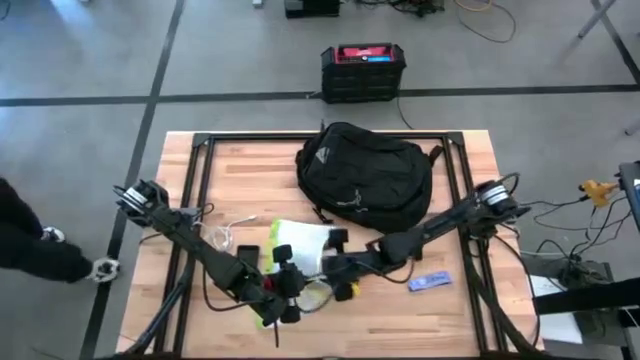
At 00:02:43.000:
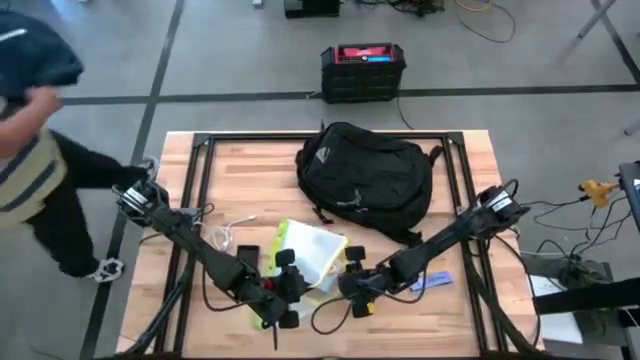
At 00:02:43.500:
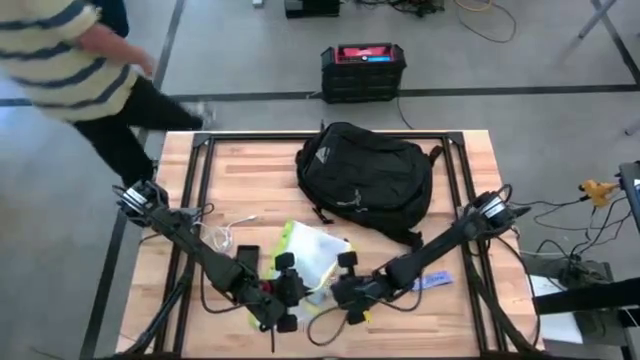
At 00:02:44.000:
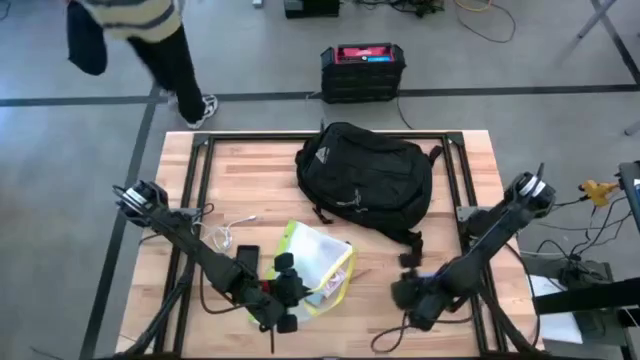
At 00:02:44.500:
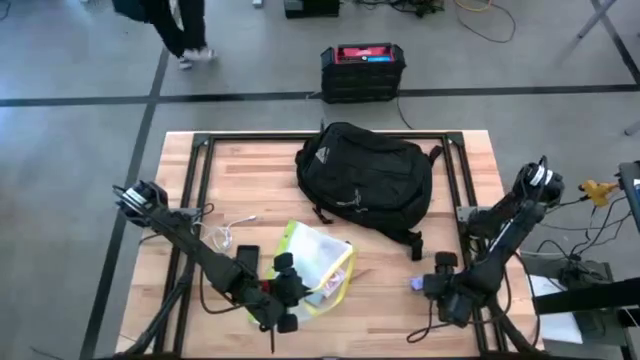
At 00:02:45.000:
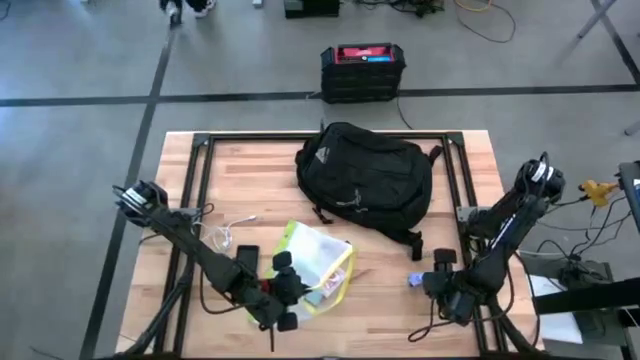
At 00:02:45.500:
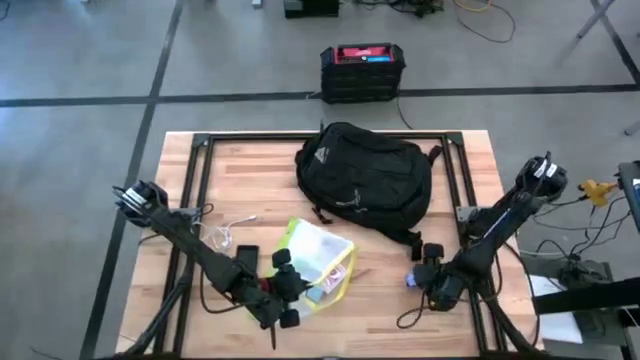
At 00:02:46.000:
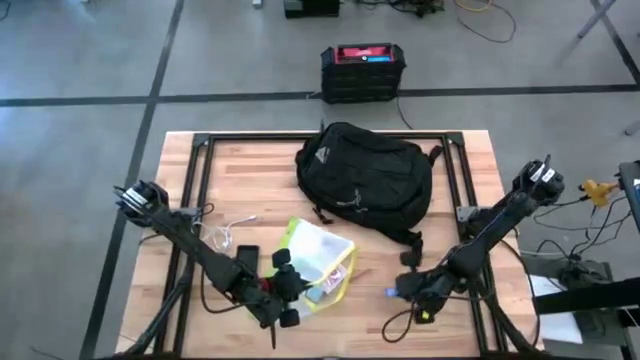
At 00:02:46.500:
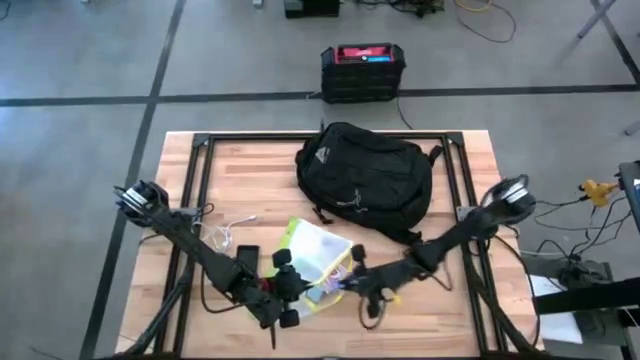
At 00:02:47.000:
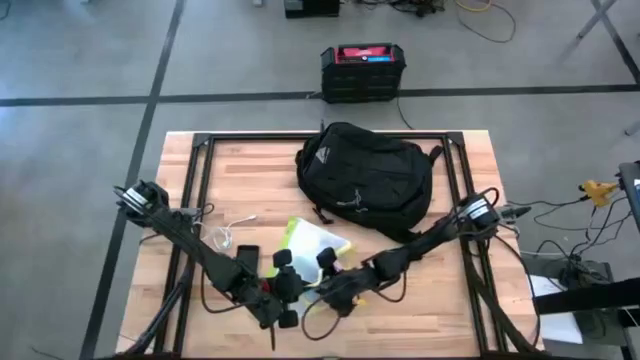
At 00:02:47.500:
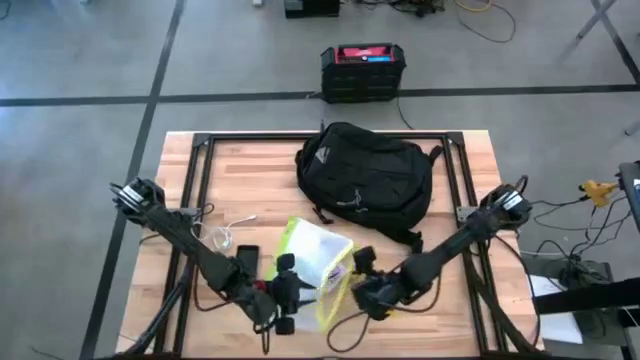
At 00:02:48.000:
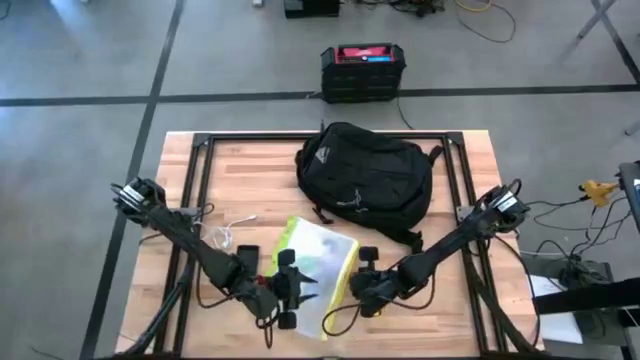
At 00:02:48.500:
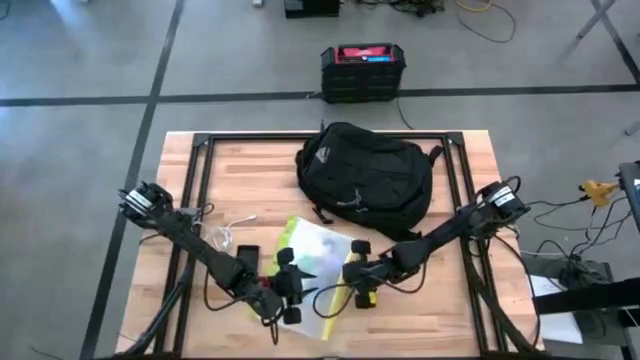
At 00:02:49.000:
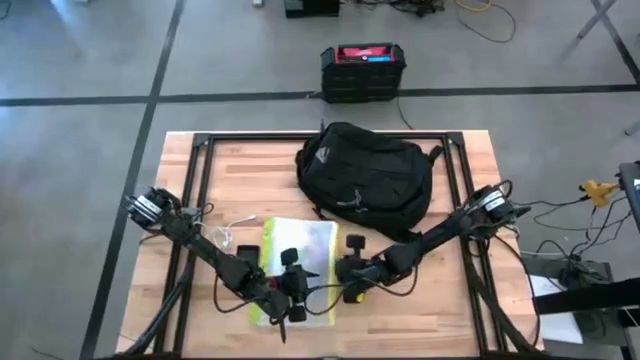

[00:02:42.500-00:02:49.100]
Task: Unpack backpack
Put the violet chocolate bar into the yellow green zip bag

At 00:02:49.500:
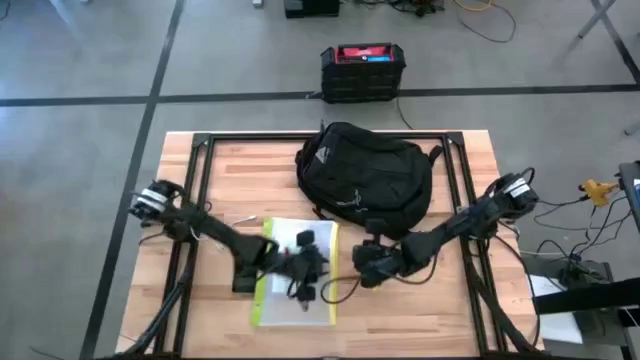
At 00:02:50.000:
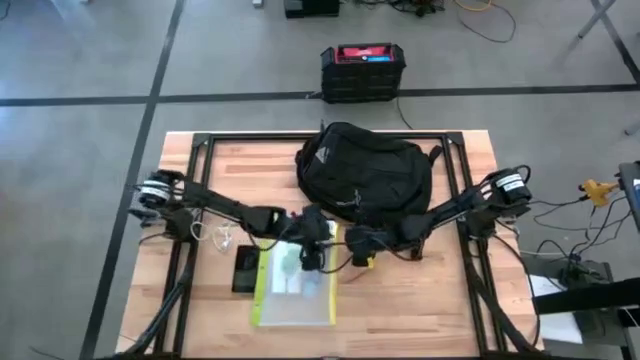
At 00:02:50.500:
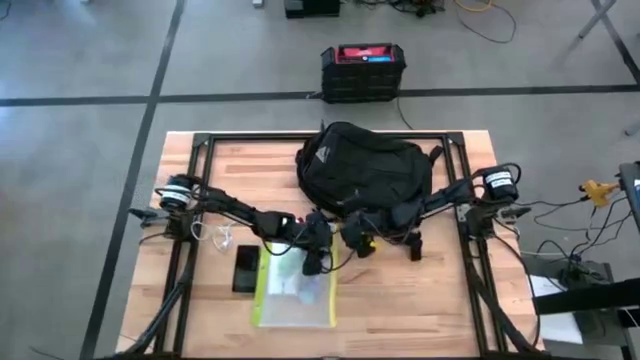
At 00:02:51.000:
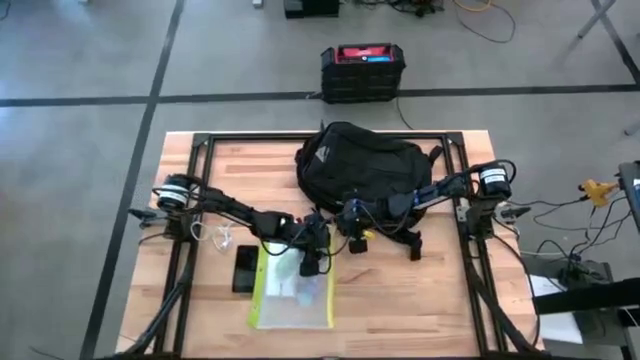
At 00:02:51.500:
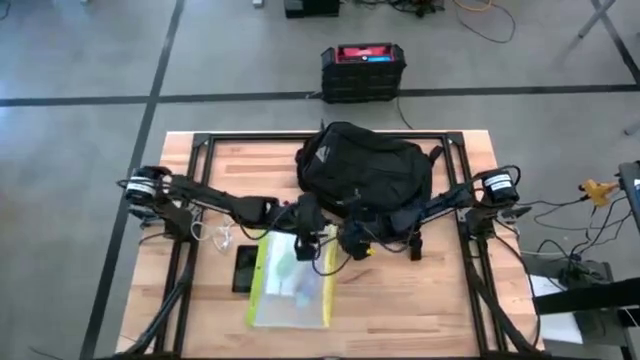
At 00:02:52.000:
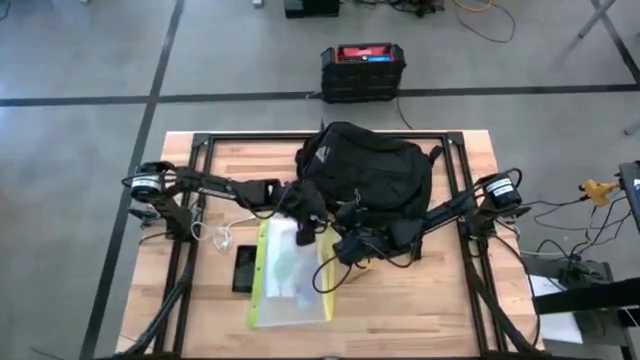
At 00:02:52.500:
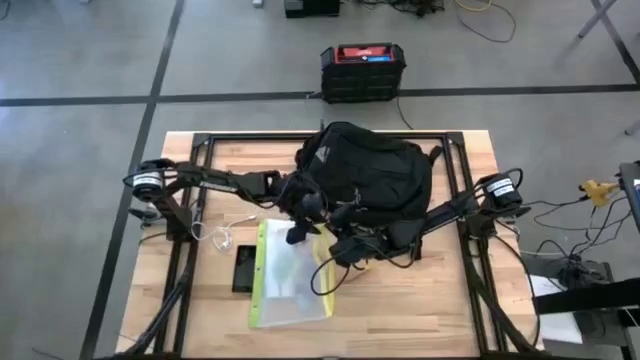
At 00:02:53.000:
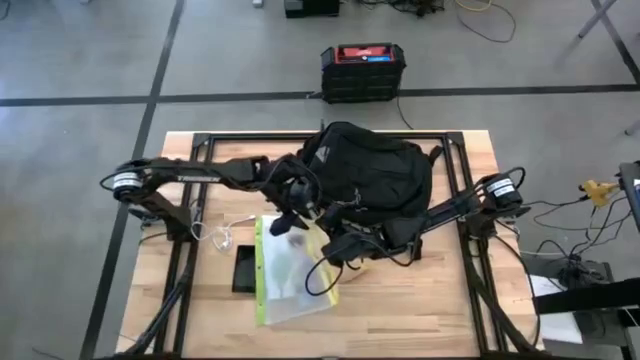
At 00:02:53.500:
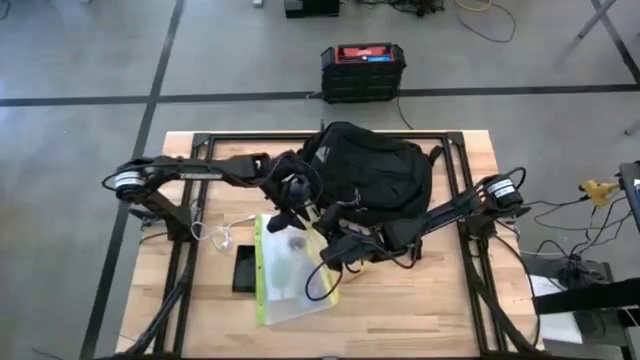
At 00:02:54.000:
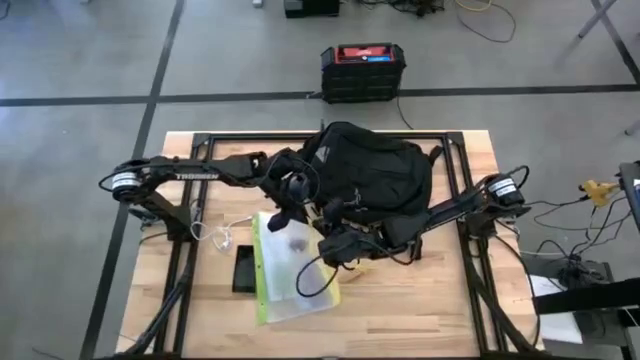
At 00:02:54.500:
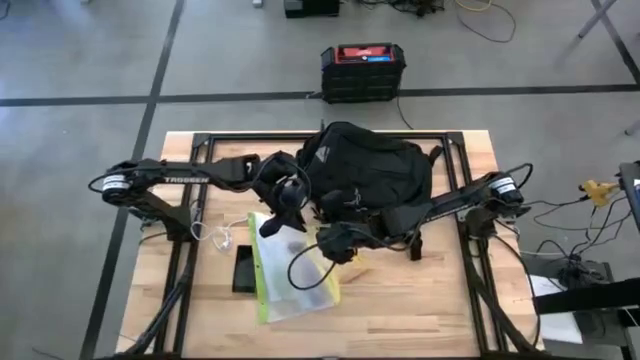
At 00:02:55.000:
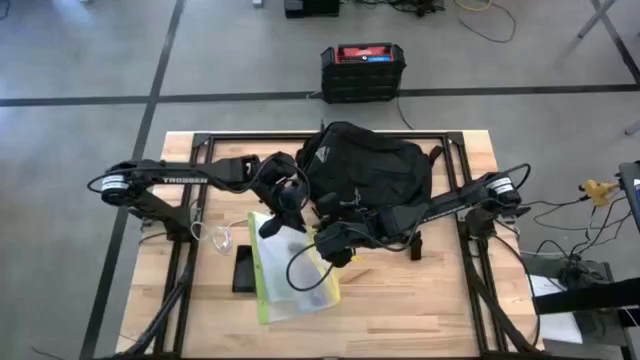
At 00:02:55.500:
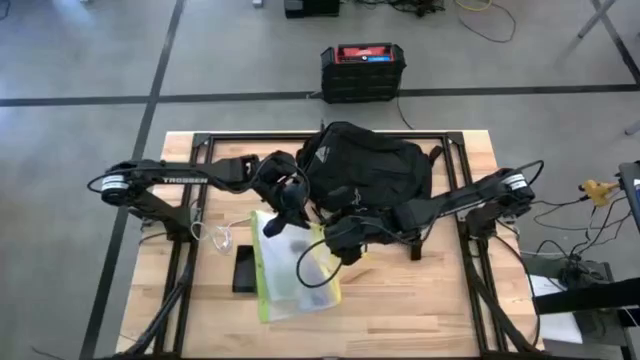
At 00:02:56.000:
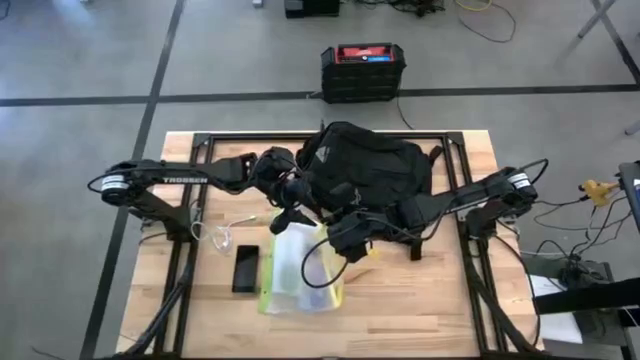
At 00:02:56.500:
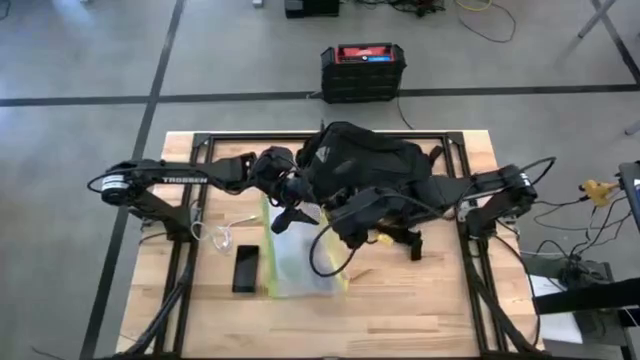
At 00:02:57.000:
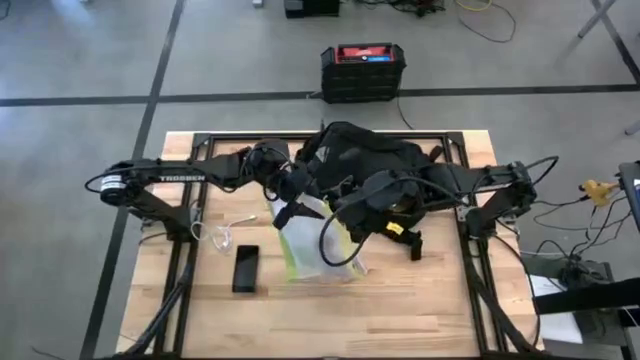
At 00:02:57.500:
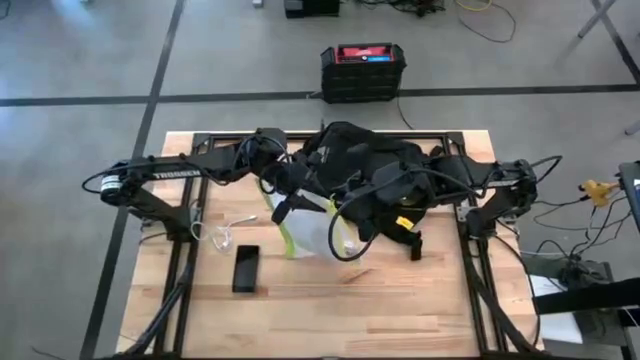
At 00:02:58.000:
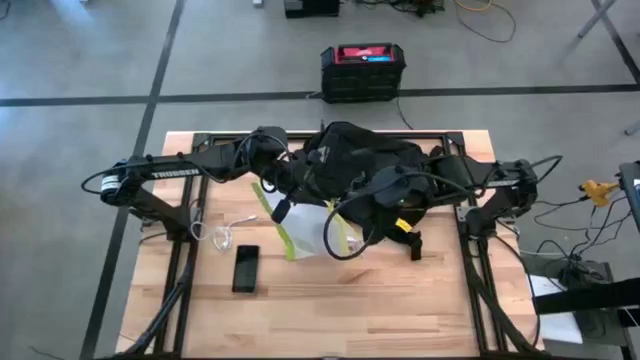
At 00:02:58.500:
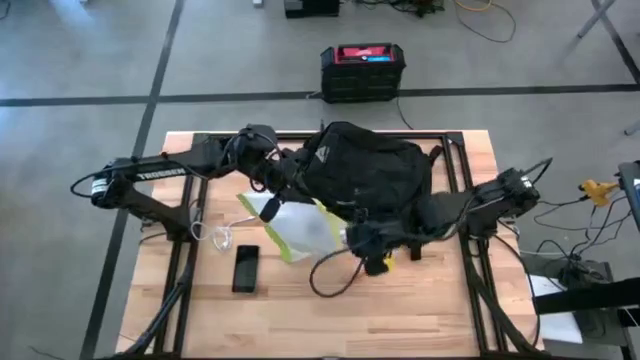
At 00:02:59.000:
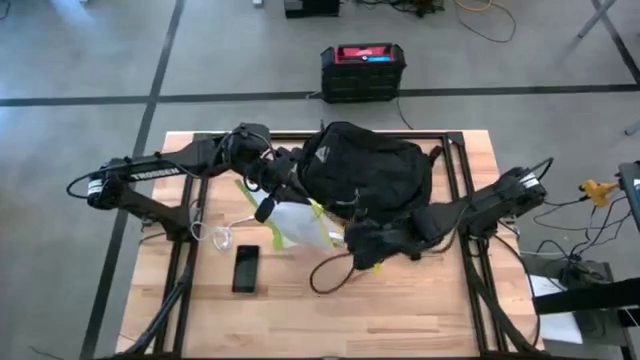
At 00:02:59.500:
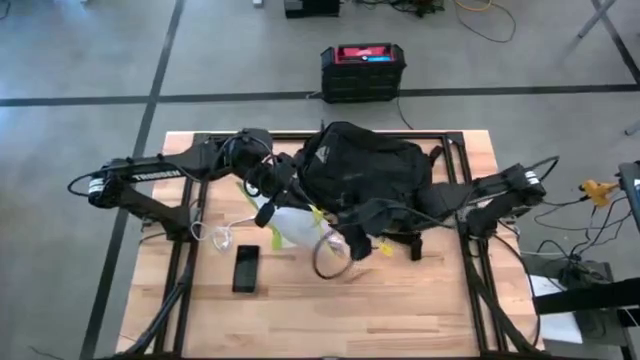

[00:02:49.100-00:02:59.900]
Close the yellow green zip bag

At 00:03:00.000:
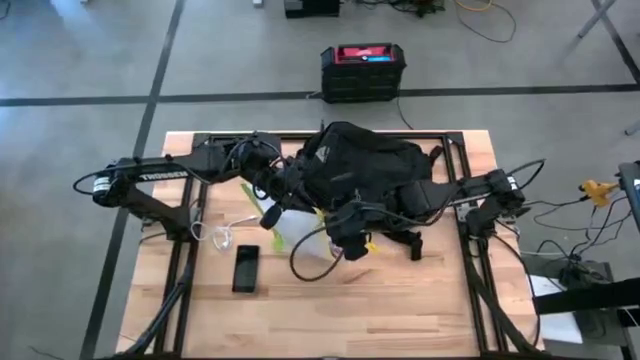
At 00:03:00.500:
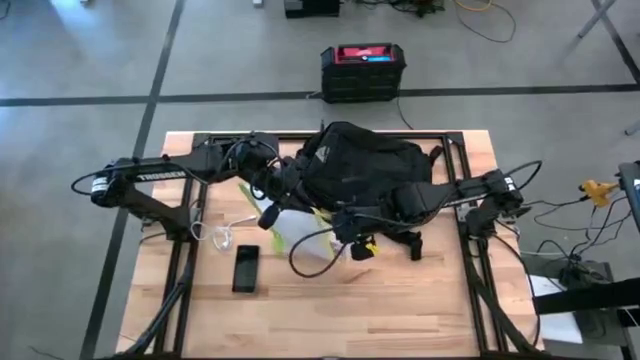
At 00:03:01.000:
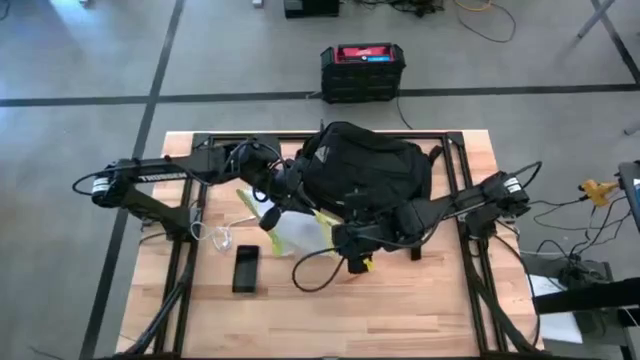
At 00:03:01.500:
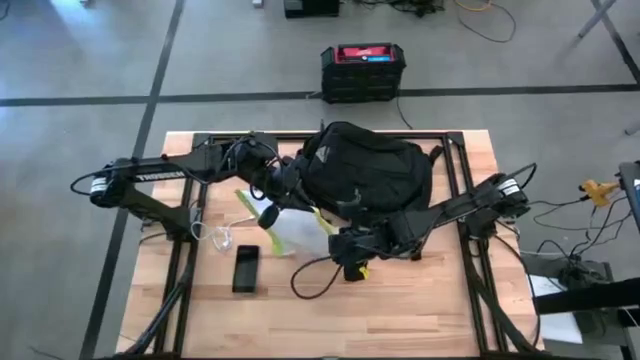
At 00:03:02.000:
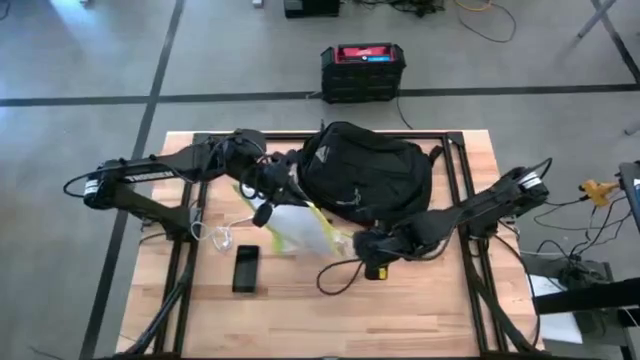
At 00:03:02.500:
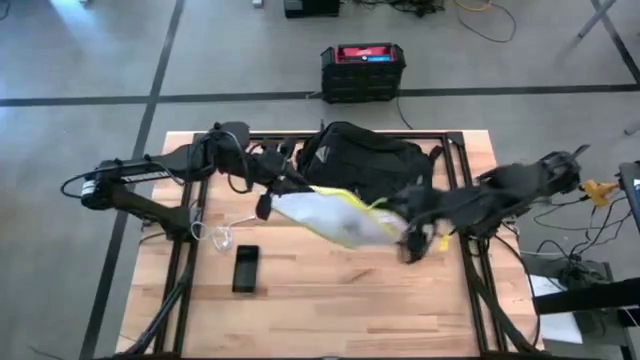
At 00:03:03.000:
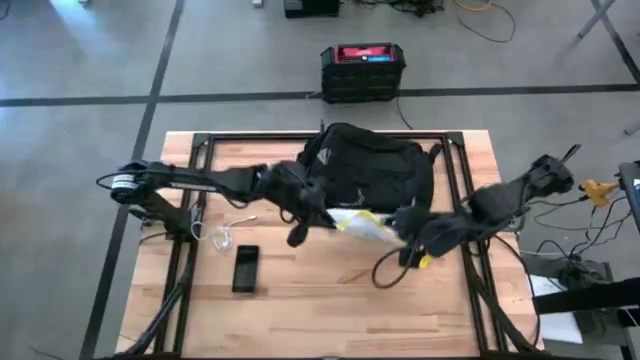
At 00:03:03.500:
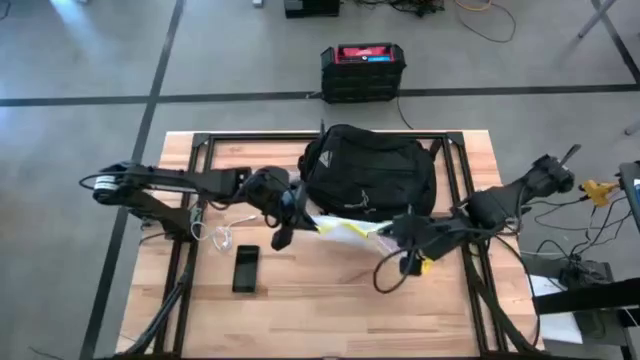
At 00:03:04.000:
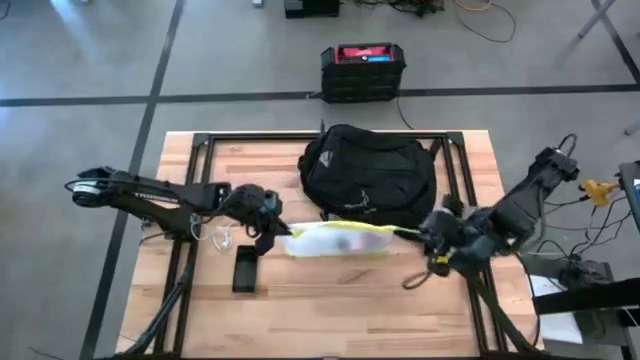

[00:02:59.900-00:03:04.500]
Close the yellow green zip bag
